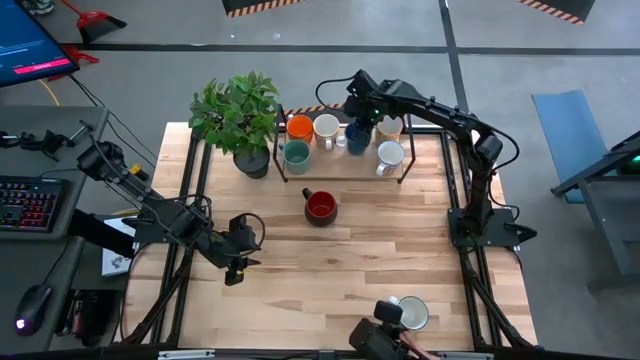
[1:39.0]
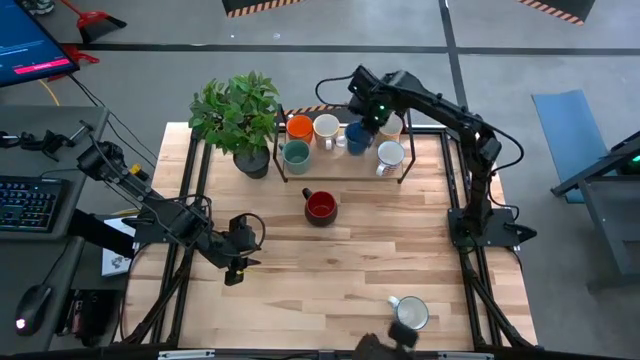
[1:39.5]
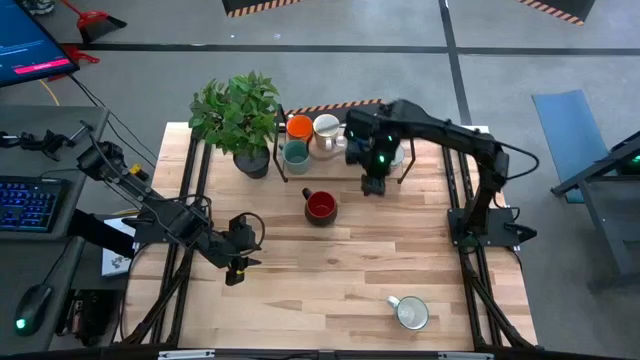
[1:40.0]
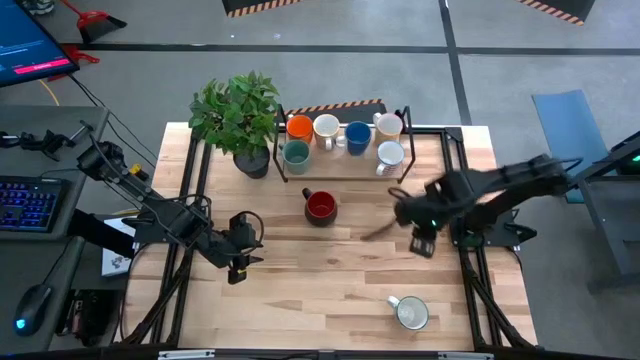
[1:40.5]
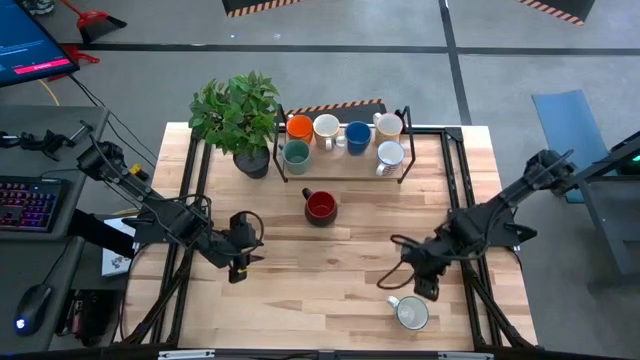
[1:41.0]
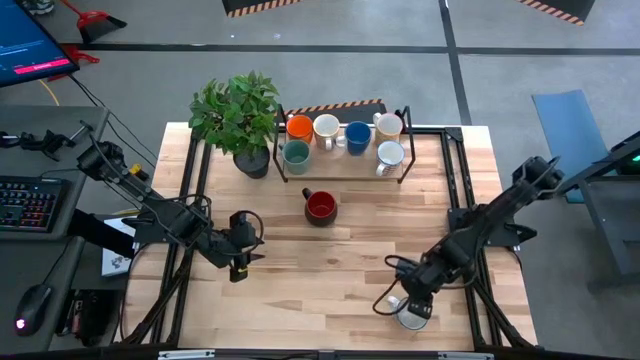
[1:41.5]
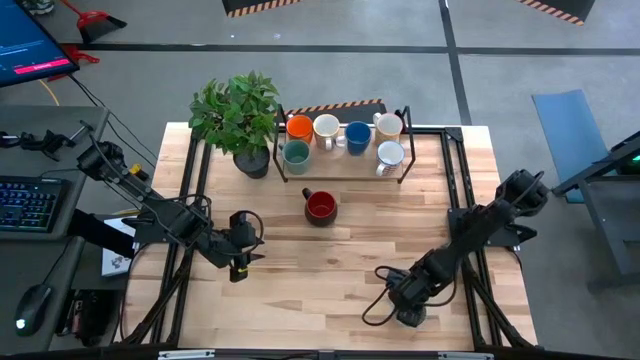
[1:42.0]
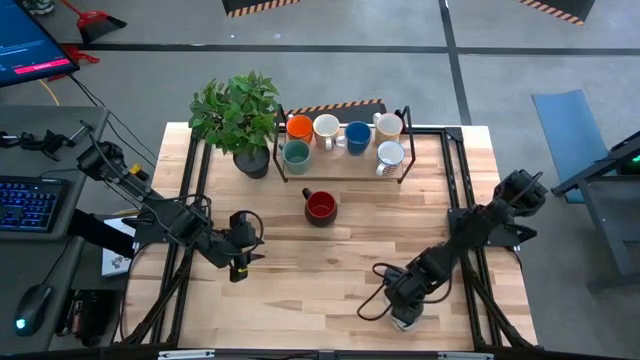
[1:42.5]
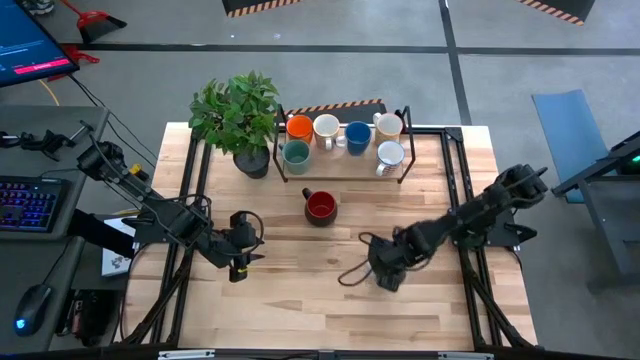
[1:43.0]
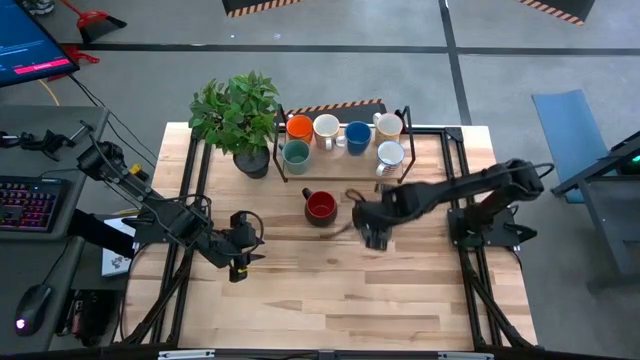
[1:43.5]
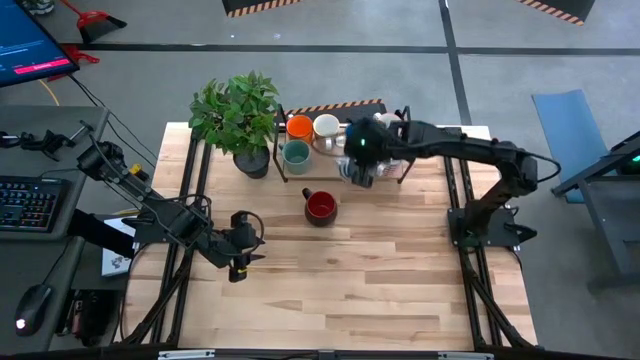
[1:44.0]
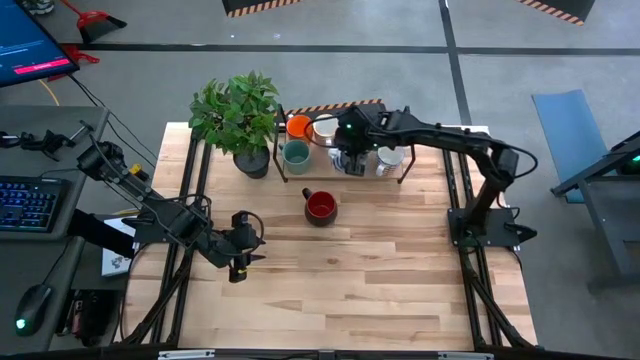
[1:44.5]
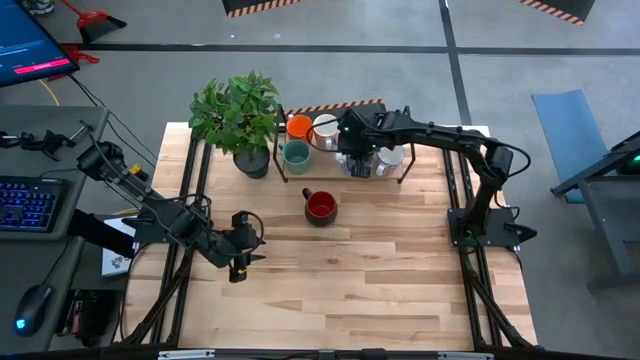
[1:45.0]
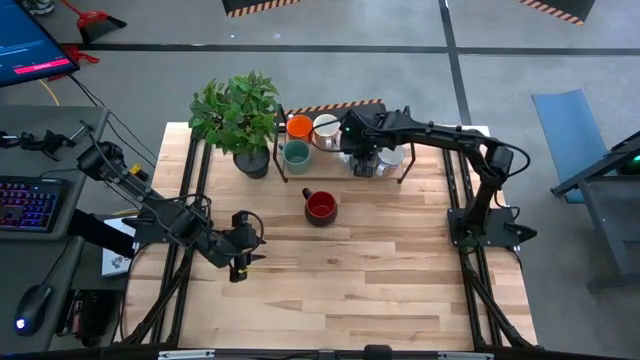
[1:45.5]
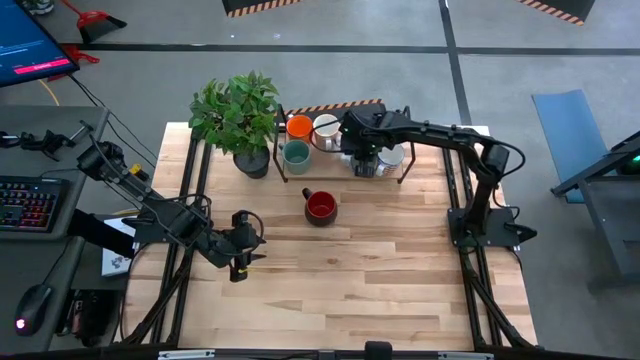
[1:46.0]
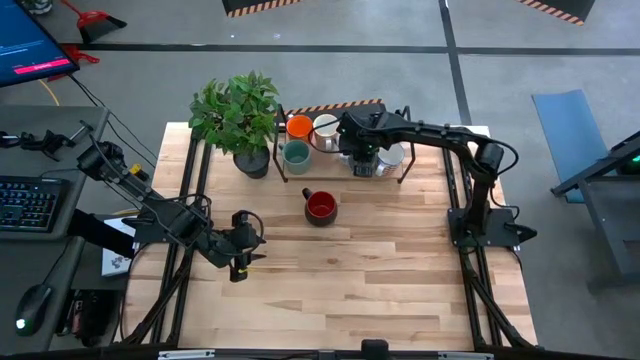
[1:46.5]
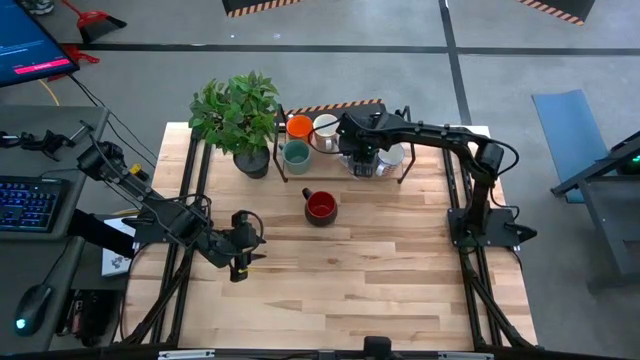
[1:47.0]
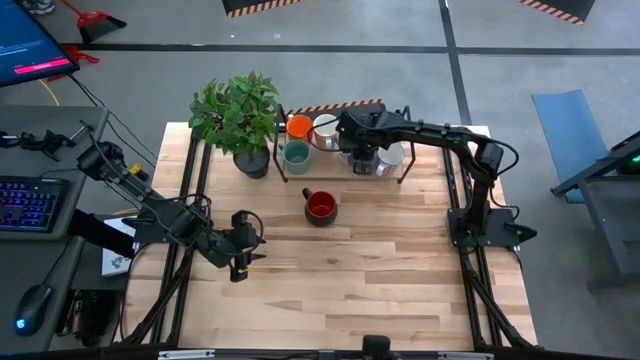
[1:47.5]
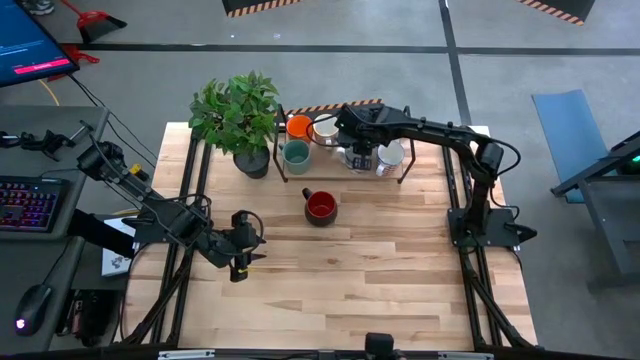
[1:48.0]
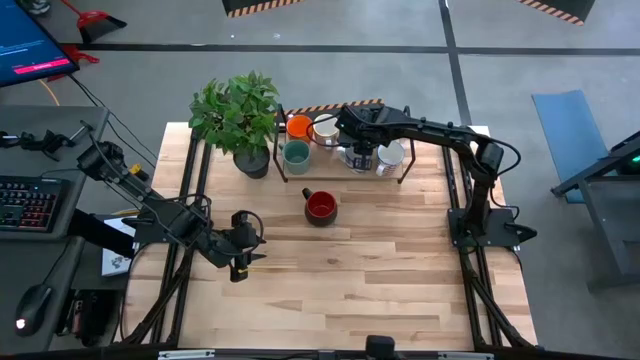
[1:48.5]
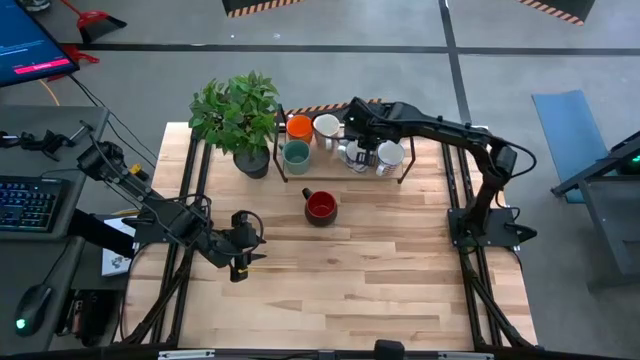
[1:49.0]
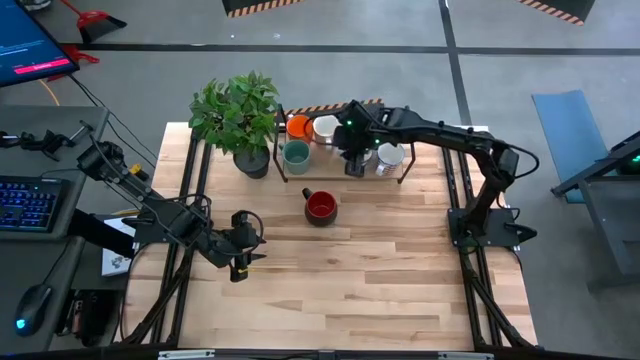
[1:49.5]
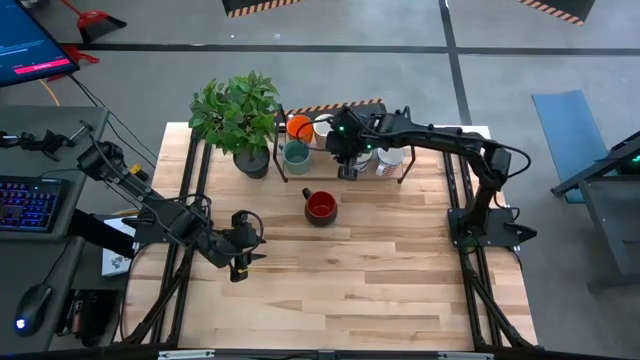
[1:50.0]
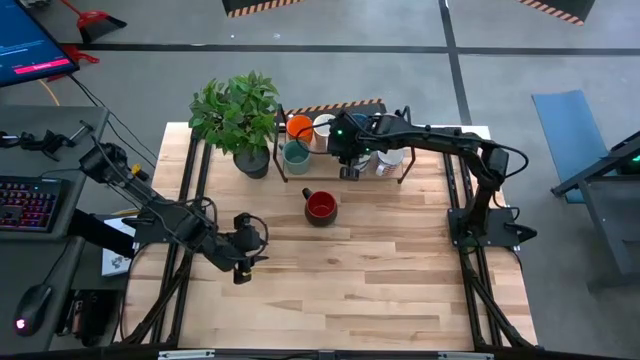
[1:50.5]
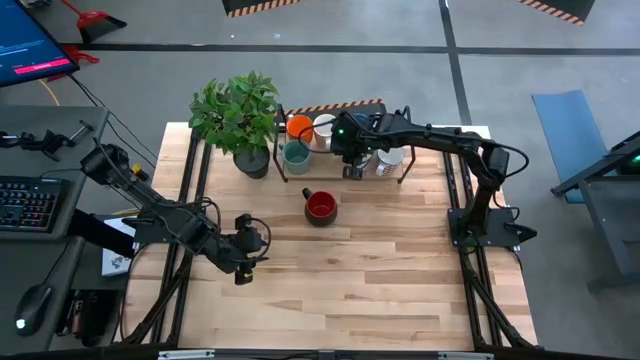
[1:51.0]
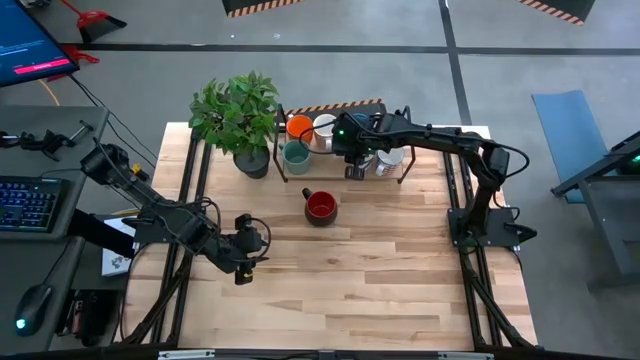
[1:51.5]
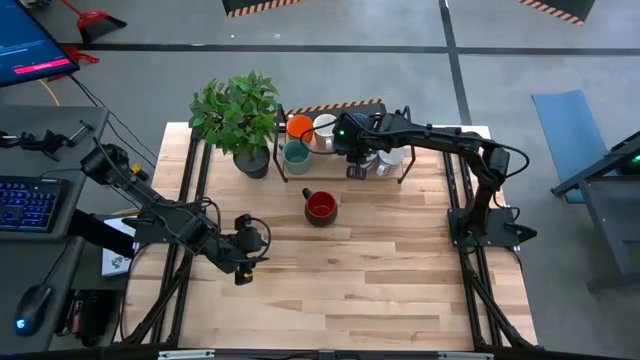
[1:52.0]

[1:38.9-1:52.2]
Task: Place coffee mugs
Put the patterned blue mug on the shelf

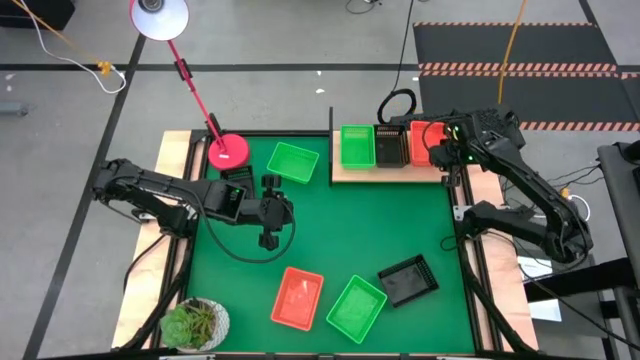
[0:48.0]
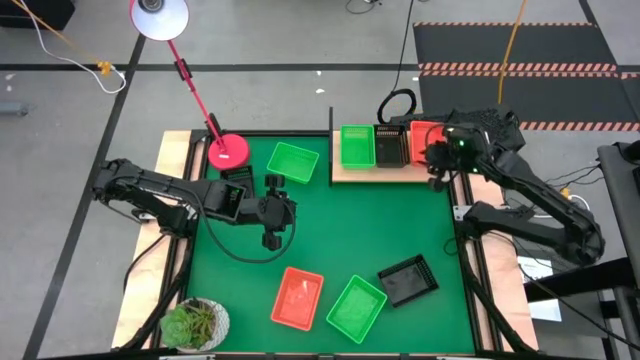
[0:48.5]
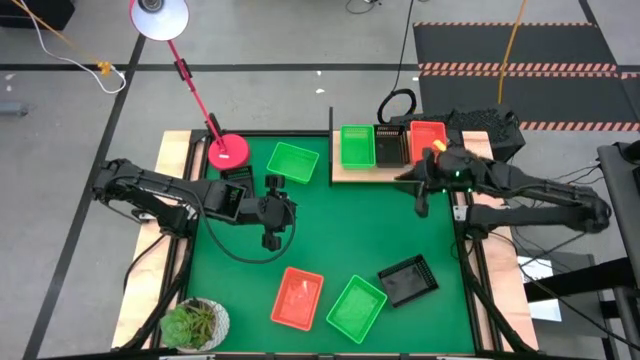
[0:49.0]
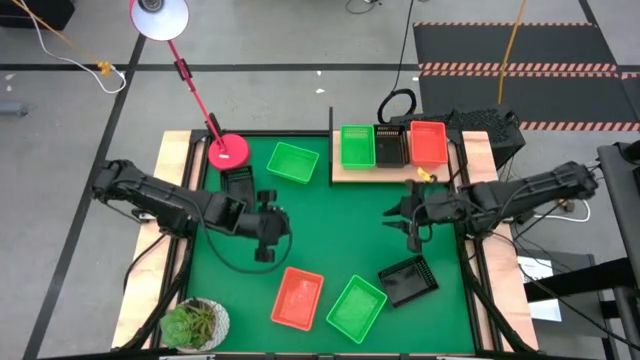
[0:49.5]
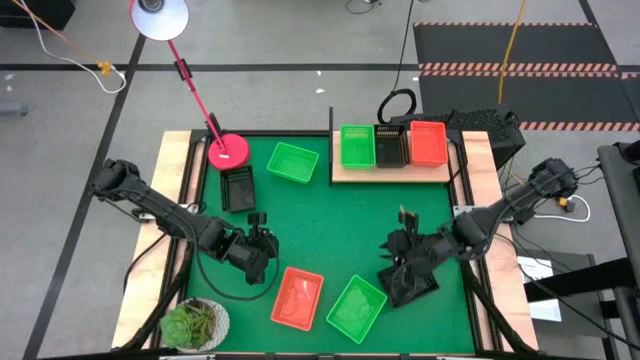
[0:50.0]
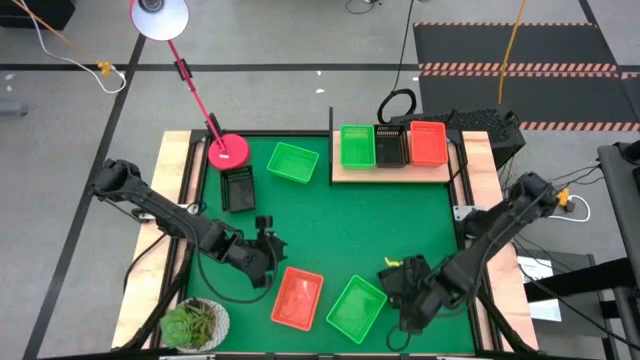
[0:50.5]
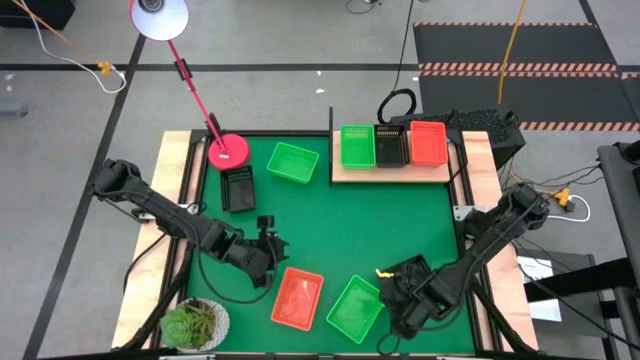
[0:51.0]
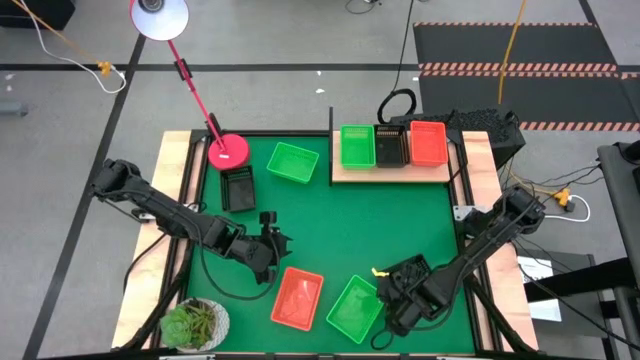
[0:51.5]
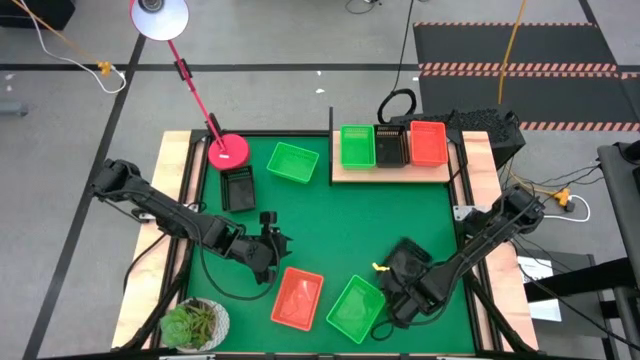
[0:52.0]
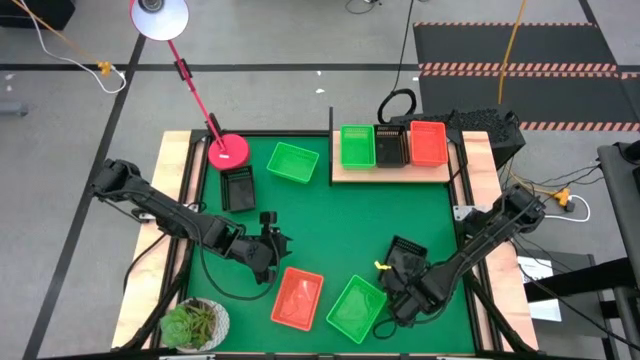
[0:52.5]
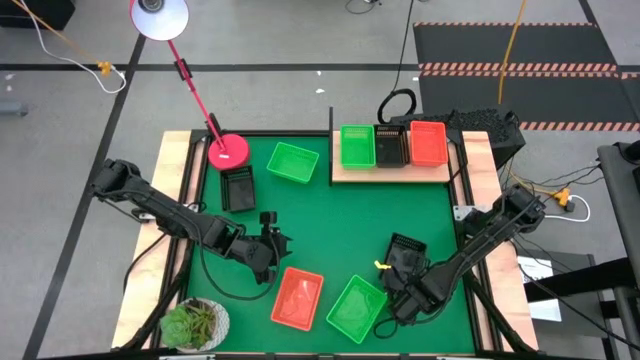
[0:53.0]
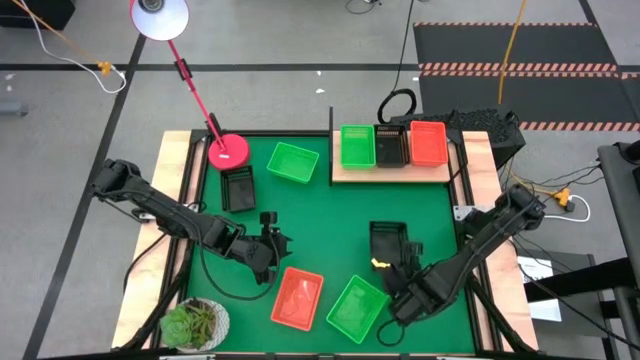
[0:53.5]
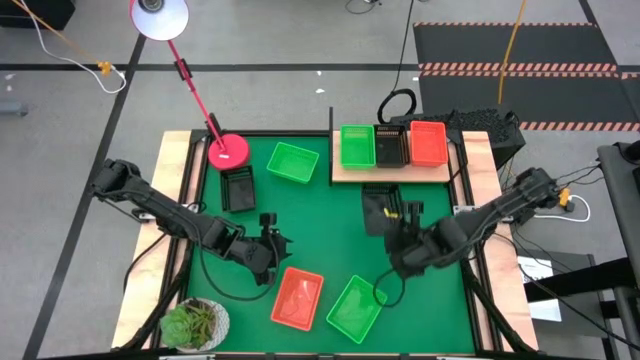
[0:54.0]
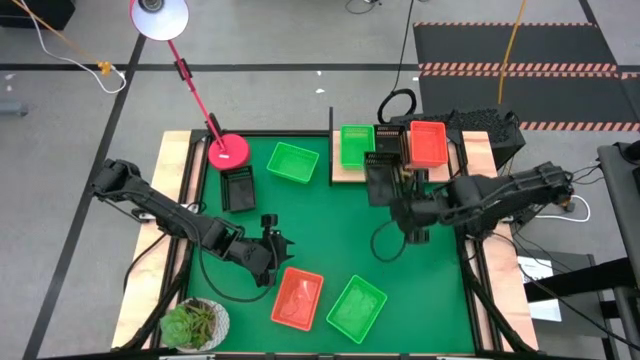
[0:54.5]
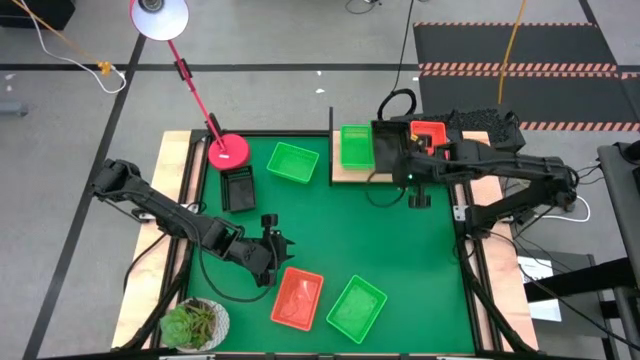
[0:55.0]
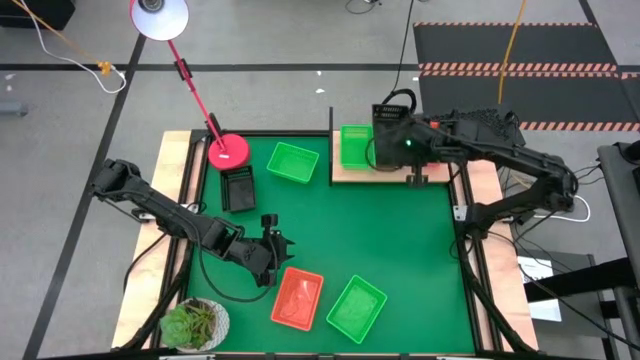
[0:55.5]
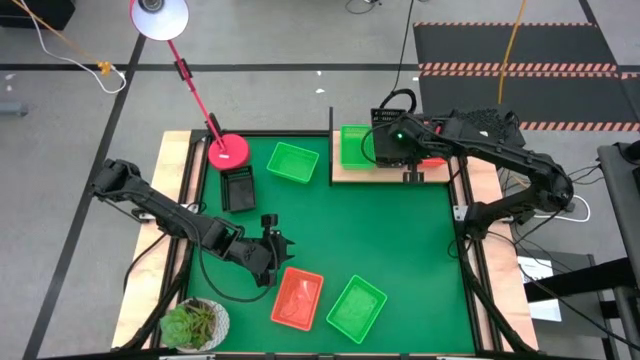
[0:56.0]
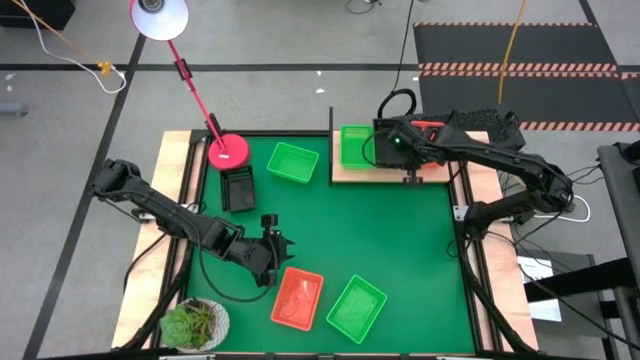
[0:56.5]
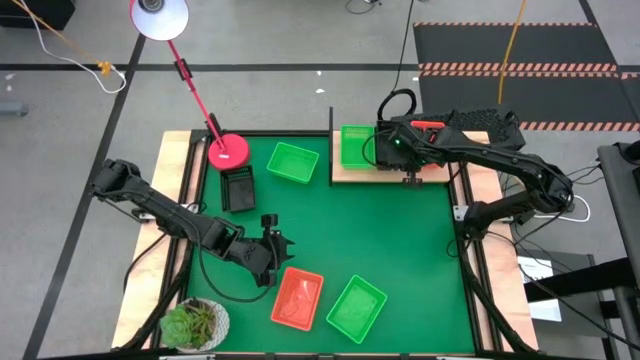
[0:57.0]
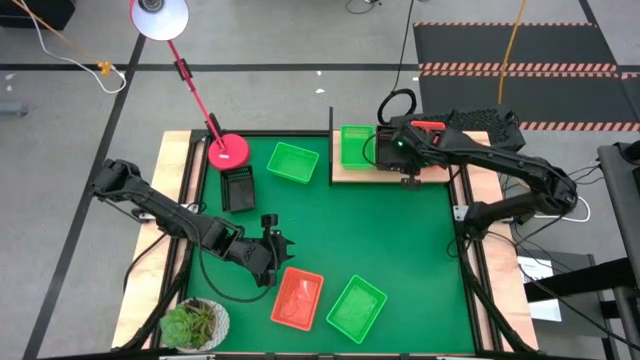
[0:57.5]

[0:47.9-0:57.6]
Task: Stack baskets on shelf by color
Stack the bottom black bin on top of the black bin on the shelf
